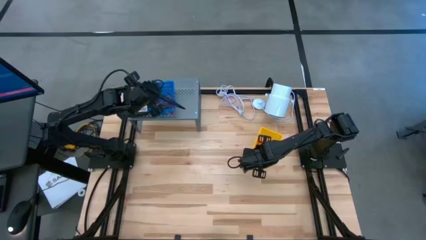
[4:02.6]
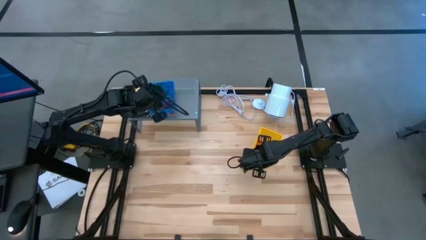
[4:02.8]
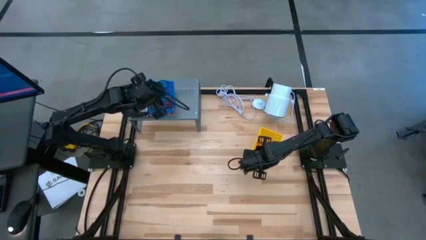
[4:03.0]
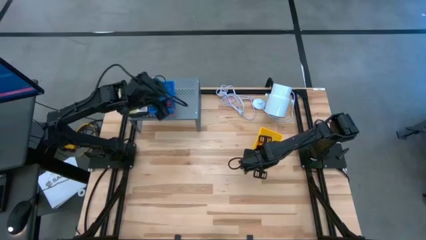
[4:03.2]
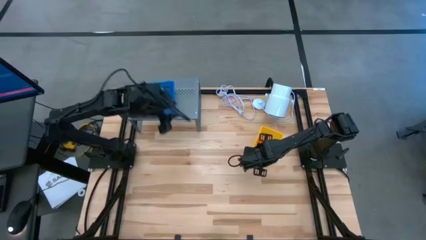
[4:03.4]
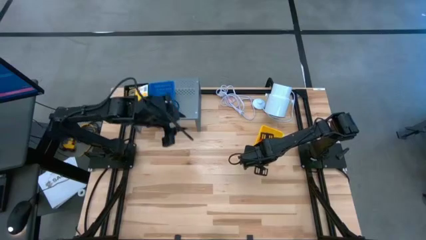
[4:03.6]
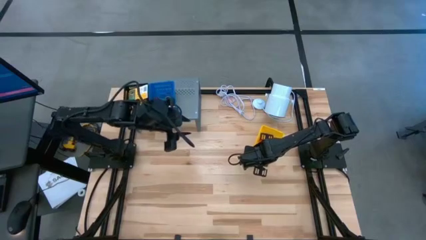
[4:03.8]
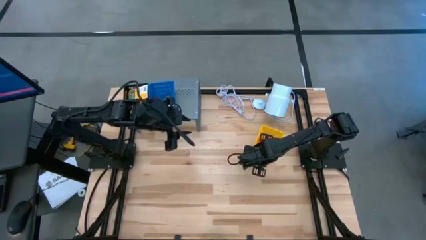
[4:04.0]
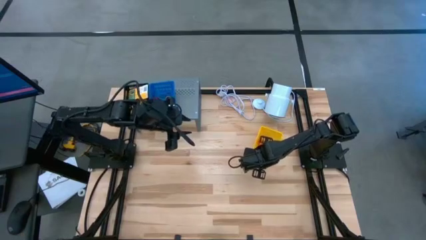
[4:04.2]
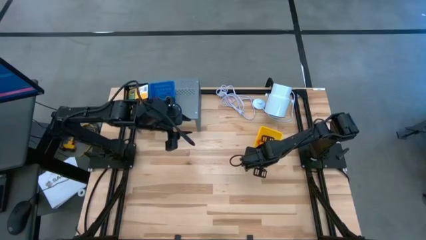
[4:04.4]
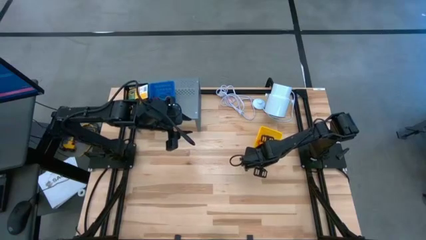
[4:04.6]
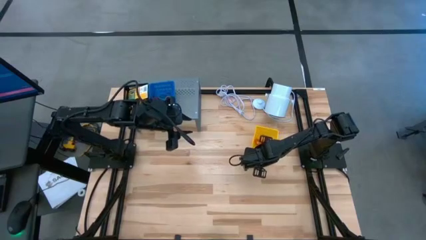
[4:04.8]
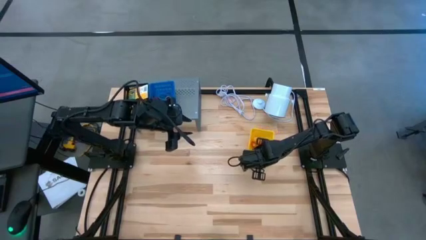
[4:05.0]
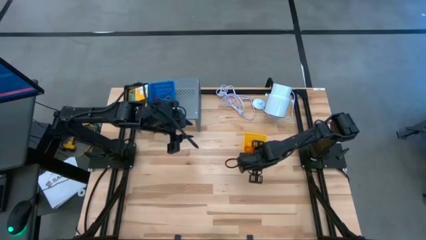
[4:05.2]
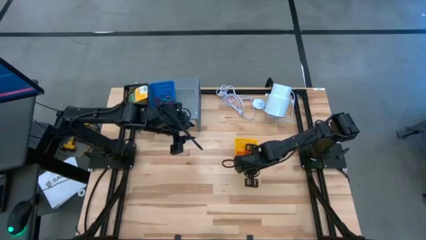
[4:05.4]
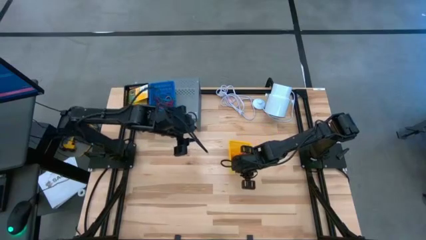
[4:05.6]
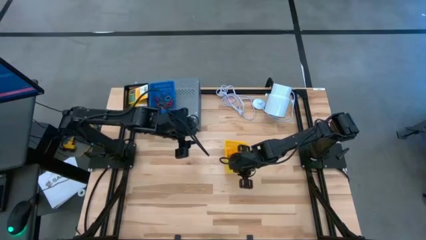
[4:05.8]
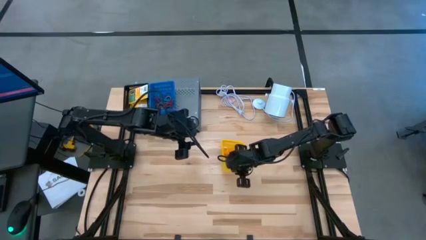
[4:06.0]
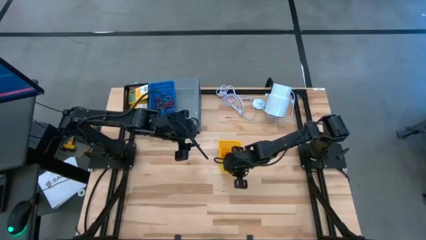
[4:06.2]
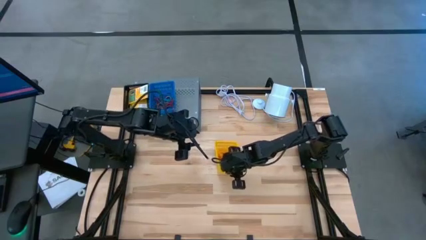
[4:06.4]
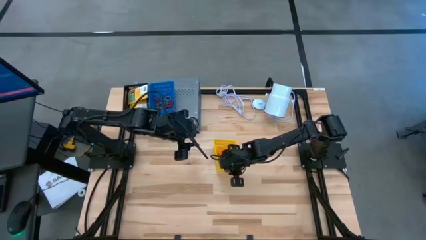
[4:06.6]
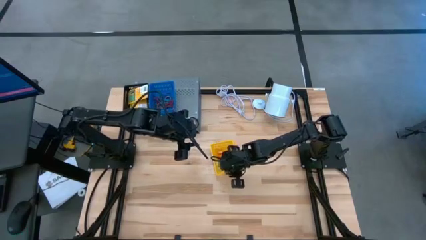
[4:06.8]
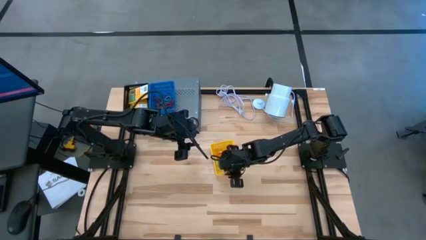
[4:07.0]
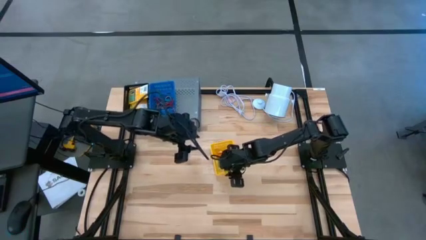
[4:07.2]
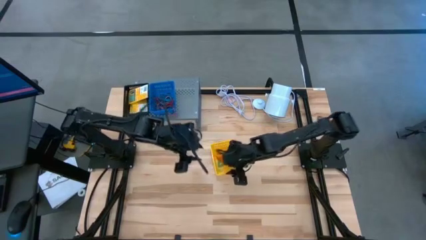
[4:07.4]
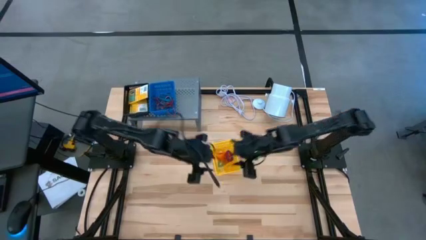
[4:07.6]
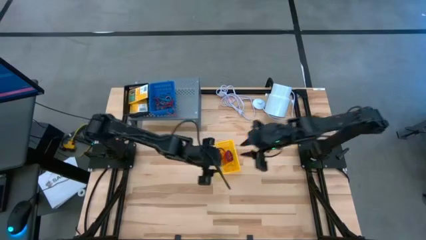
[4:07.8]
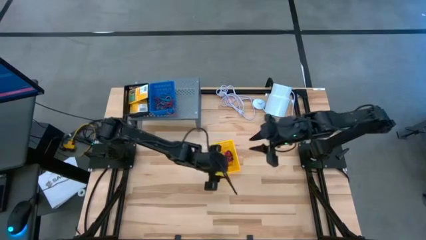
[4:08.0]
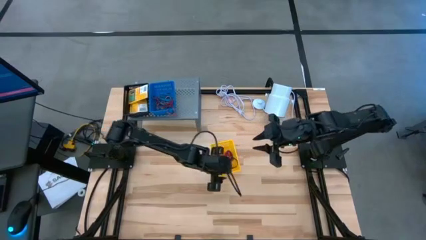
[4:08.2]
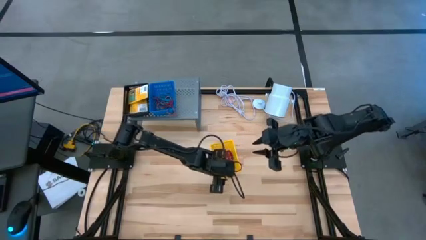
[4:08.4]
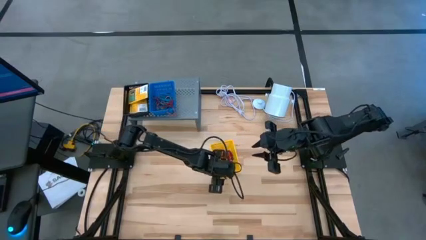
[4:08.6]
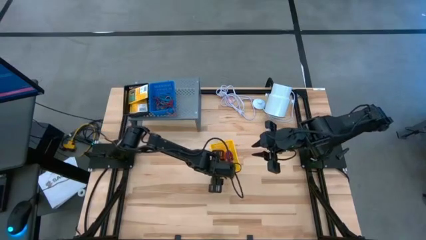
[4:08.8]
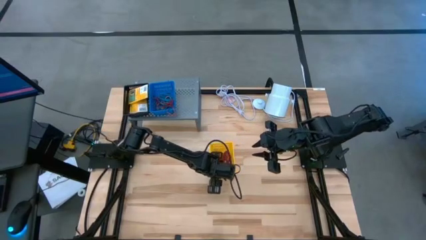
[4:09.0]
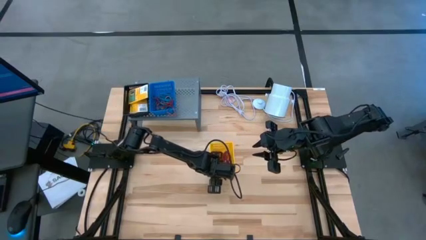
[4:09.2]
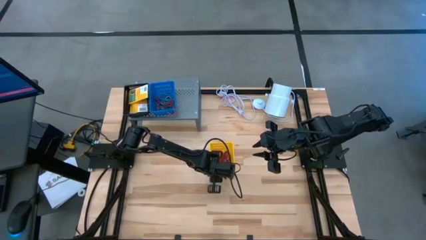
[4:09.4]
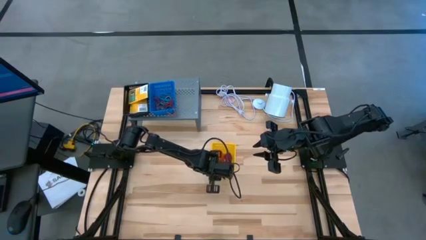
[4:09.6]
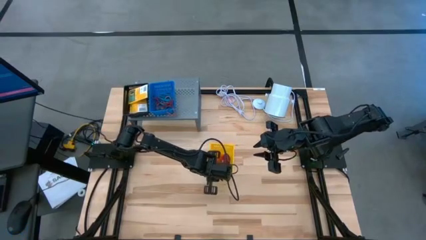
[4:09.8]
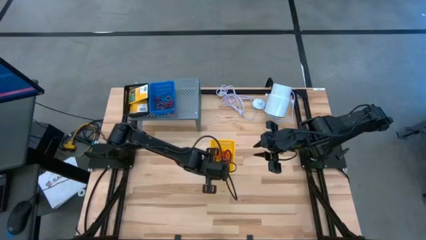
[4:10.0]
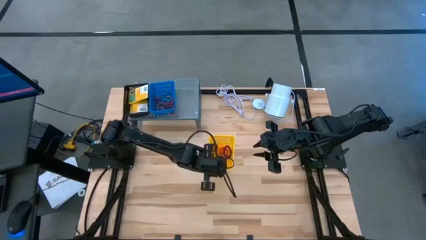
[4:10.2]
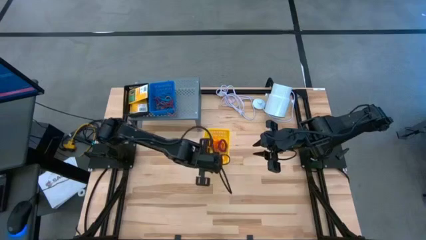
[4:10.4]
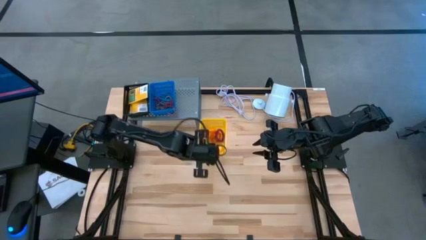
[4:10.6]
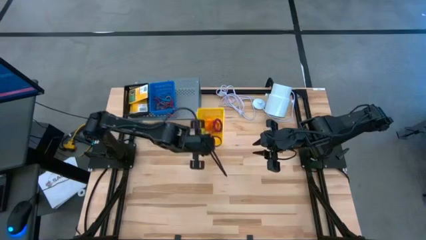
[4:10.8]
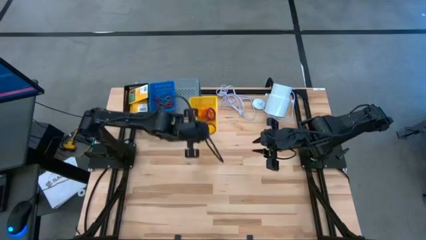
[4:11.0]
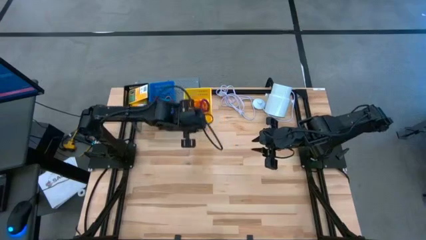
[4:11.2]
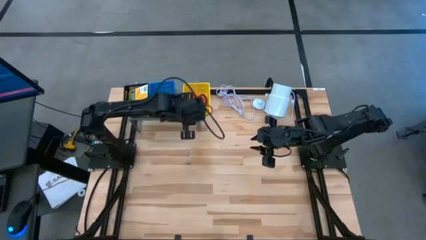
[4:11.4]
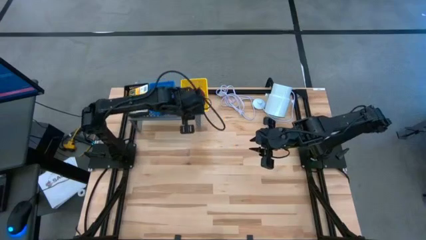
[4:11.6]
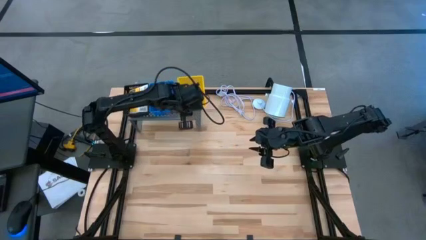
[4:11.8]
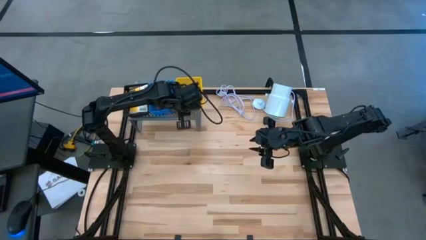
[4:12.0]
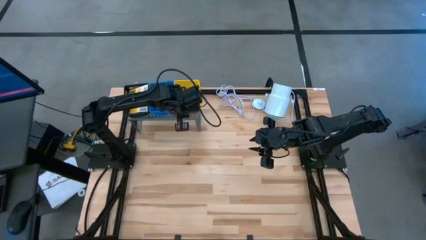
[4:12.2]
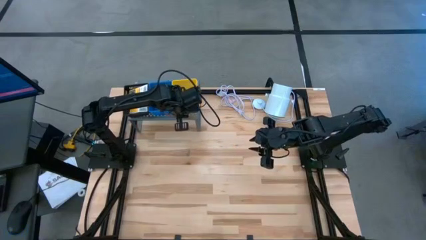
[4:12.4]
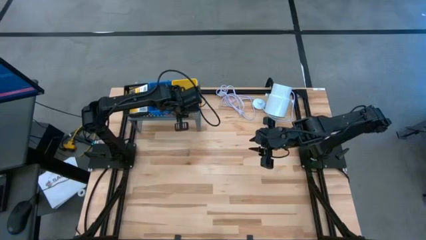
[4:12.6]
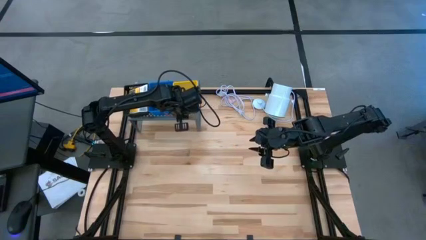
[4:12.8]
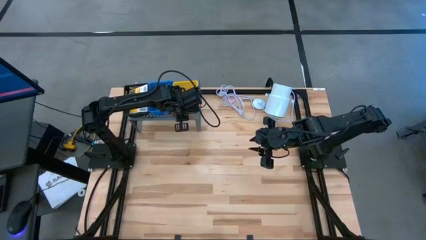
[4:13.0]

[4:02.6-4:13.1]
Task: Pick & Place Office Desk Supplies
Put the yellow basket containing the stretchable key holders on the shelf

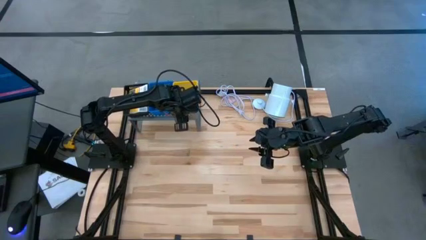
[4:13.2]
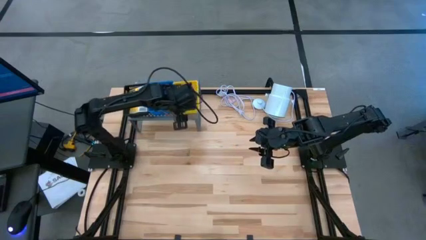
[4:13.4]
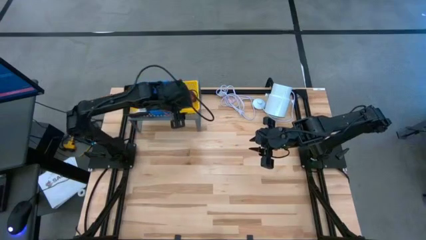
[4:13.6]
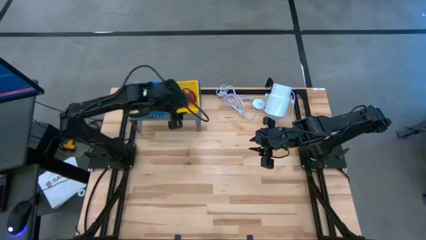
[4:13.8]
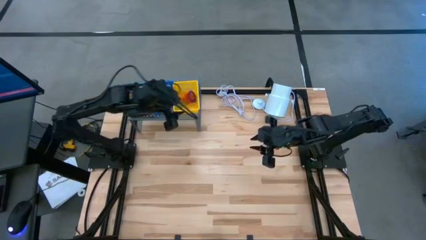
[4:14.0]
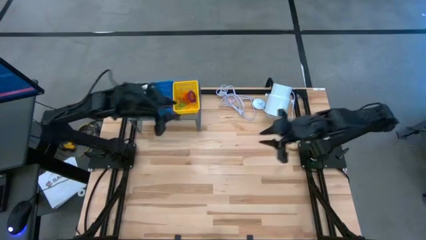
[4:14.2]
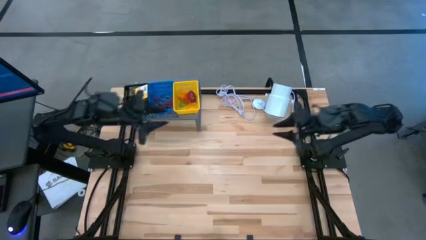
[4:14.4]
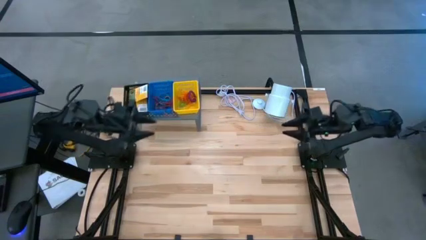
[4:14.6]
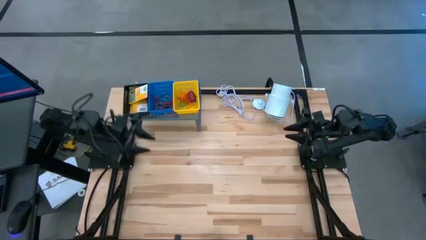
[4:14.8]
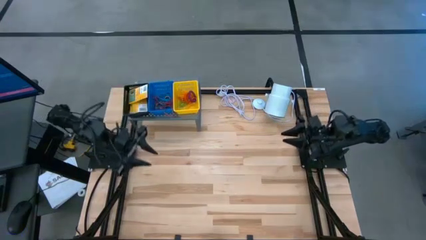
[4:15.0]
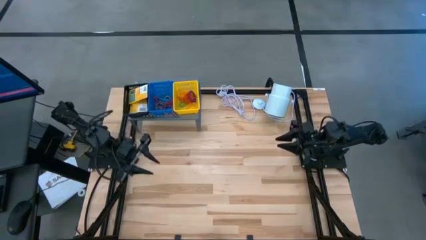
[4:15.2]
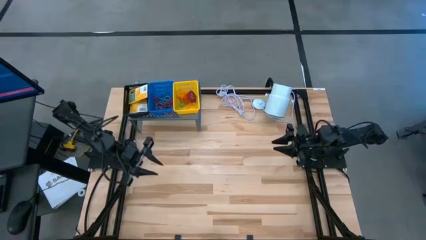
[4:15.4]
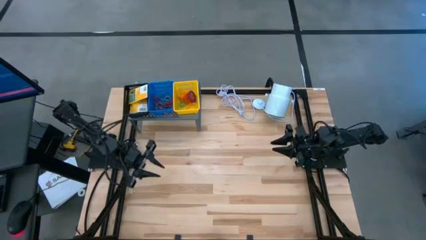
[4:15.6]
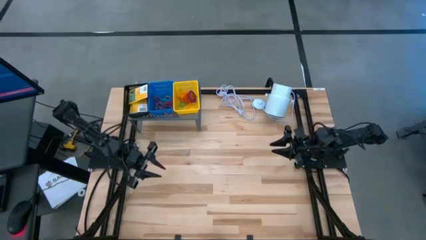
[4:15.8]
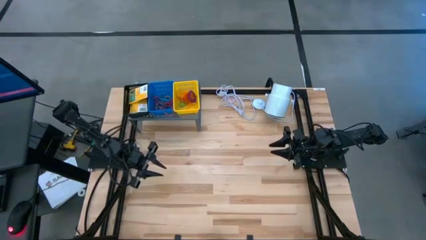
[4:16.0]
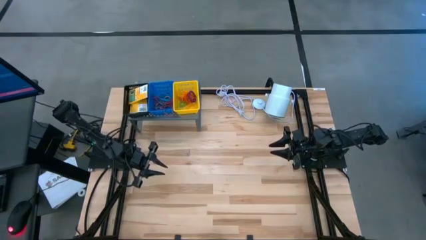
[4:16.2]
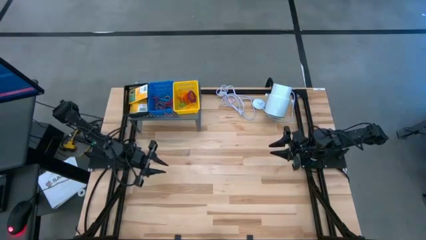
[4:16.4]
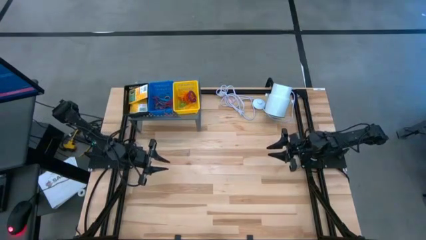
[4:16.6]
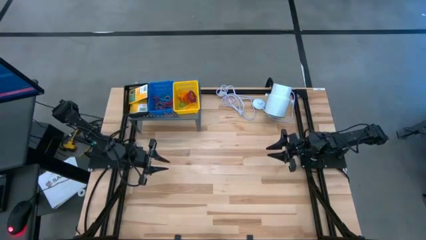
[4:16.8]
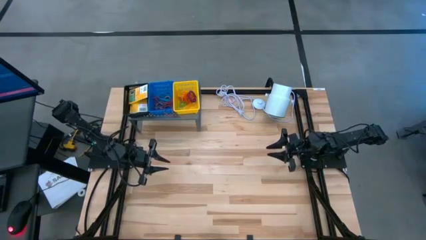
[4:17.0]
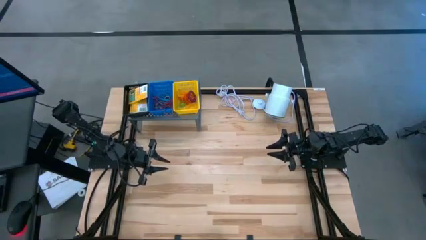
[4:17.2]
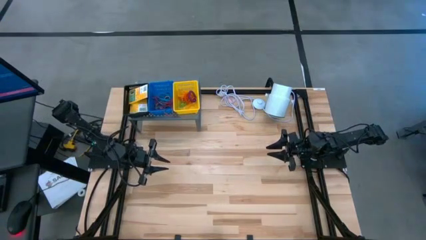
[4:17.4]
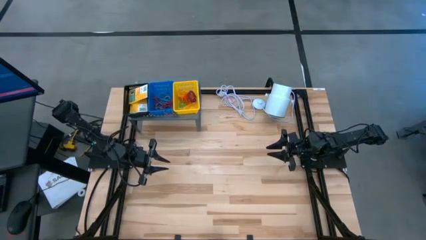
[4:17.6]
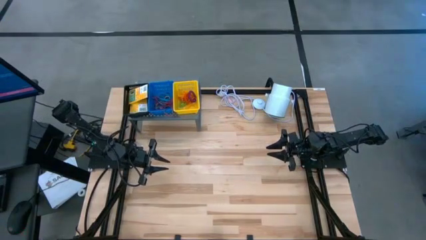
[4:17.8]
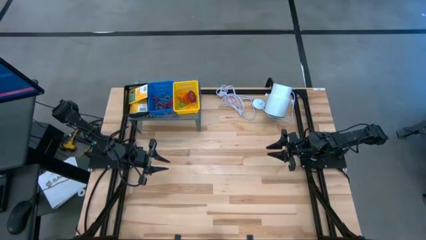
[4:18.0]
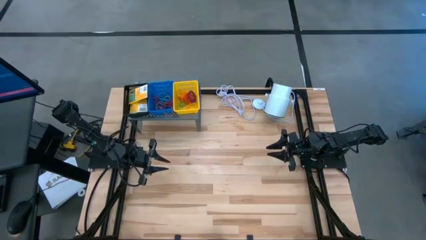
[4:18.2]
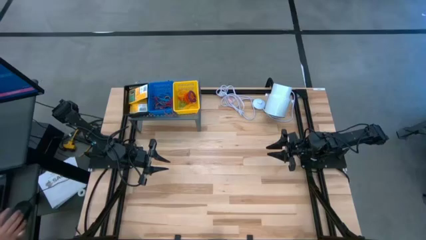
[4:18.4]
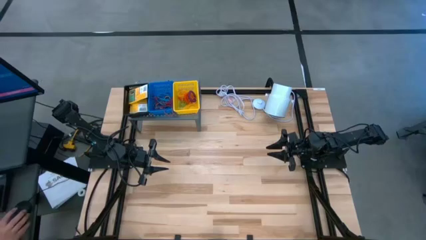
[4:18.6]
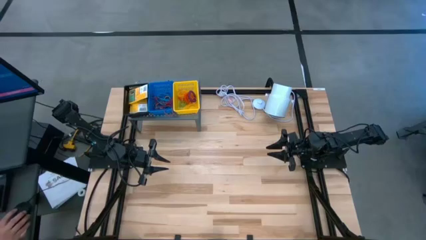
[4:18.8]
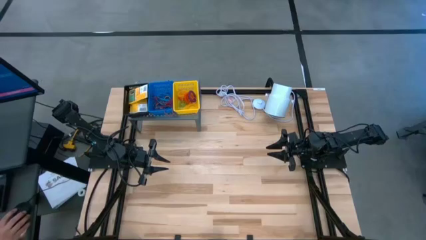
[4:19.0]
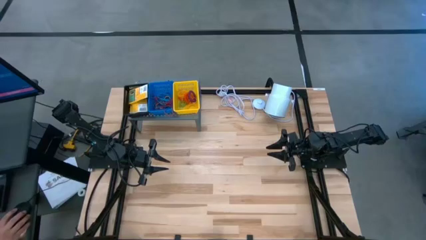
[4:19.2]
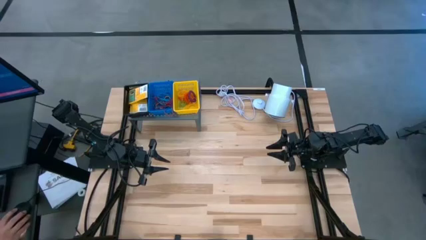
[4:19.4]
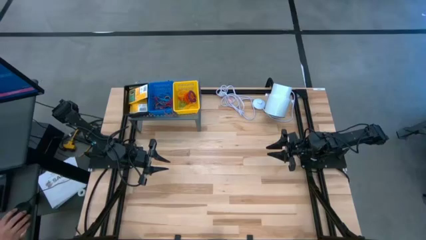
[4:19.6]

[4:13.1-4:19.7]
Return to Home Position
